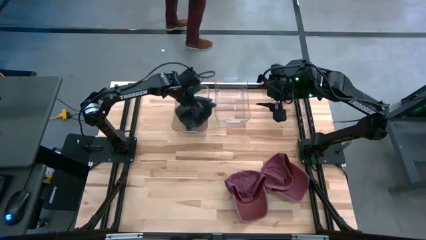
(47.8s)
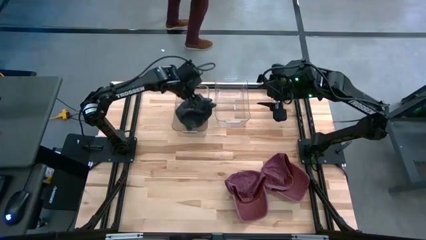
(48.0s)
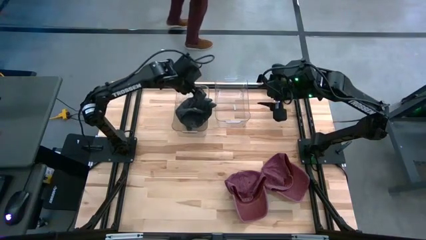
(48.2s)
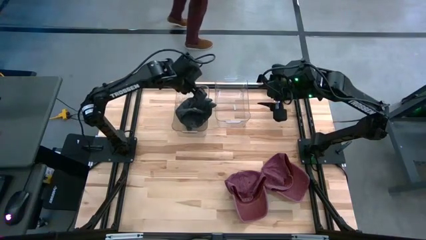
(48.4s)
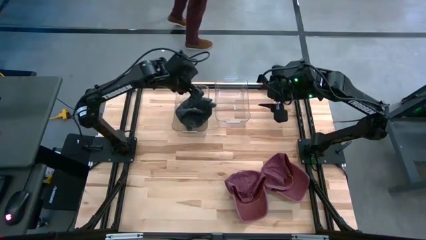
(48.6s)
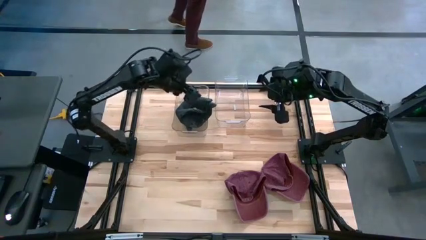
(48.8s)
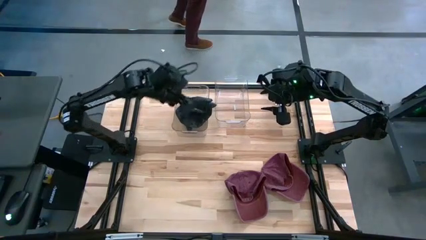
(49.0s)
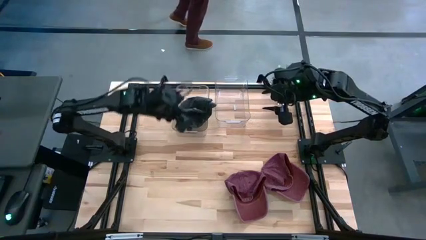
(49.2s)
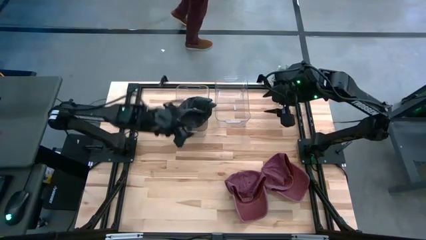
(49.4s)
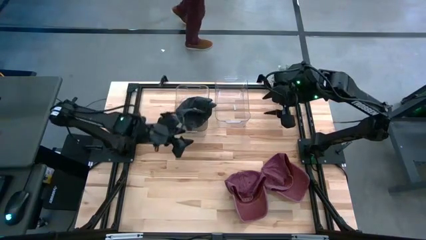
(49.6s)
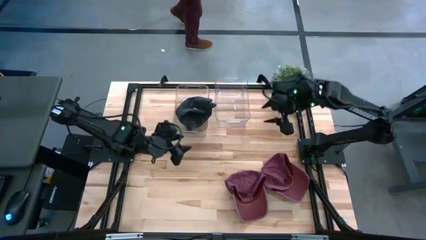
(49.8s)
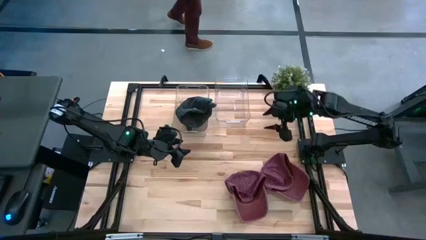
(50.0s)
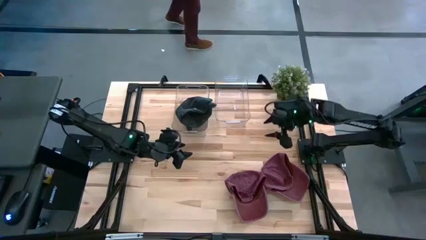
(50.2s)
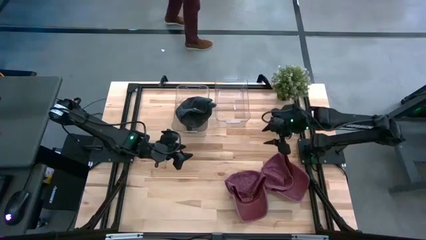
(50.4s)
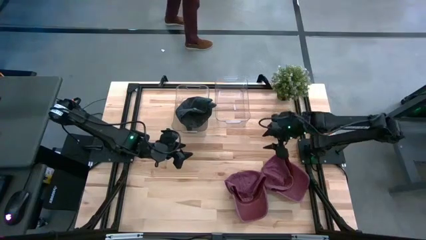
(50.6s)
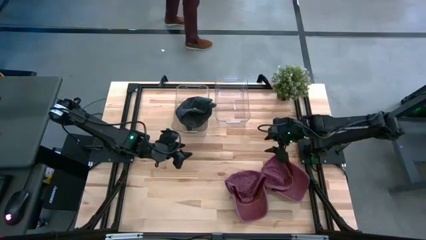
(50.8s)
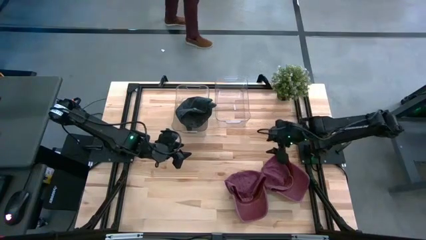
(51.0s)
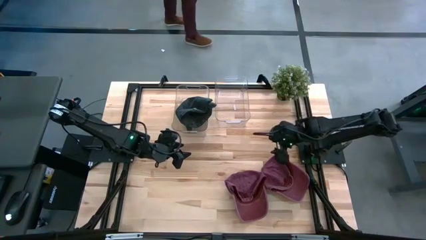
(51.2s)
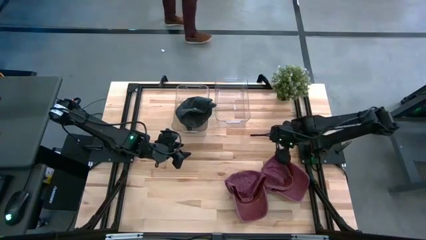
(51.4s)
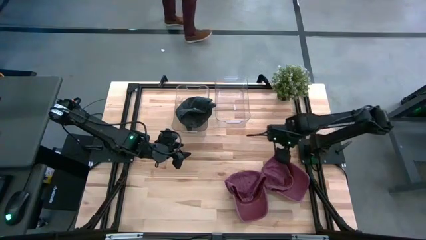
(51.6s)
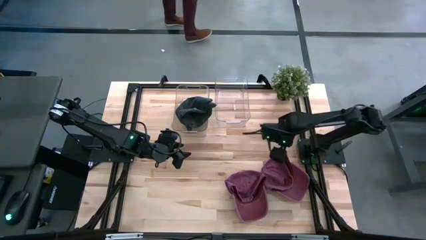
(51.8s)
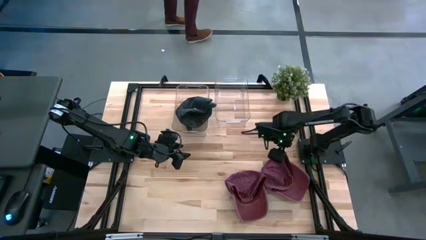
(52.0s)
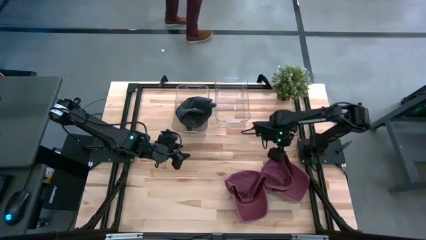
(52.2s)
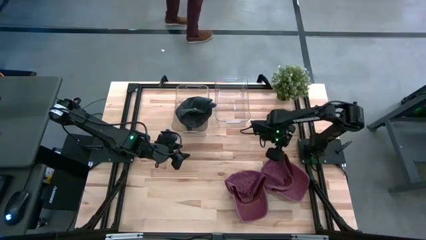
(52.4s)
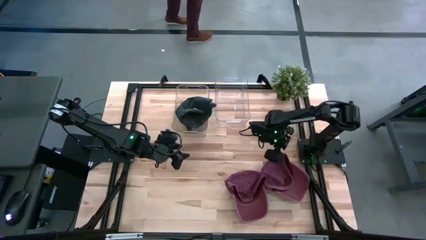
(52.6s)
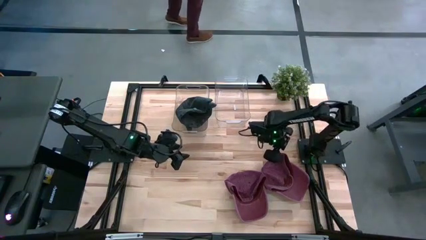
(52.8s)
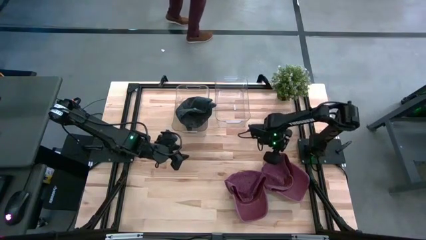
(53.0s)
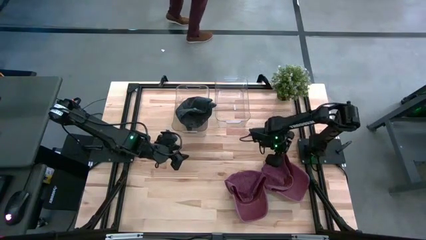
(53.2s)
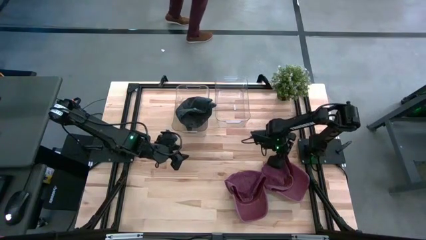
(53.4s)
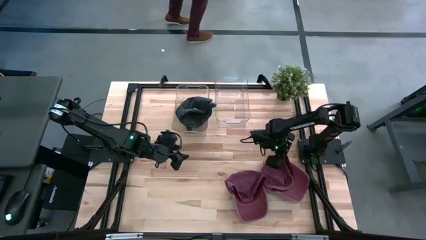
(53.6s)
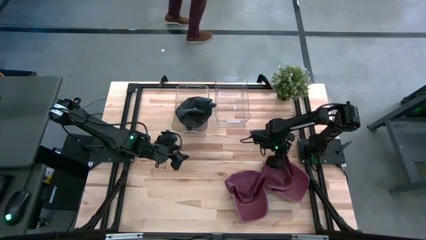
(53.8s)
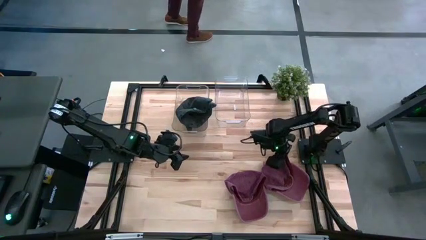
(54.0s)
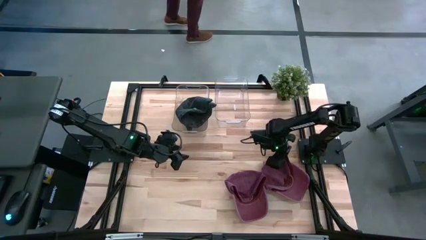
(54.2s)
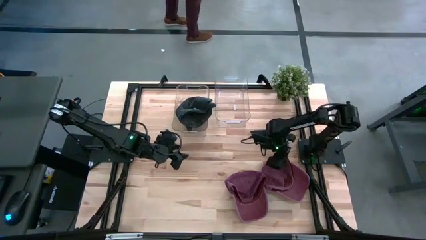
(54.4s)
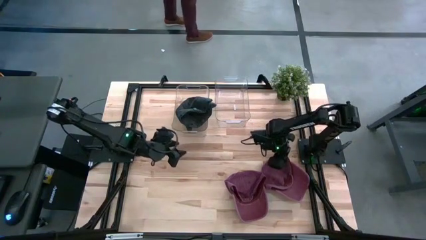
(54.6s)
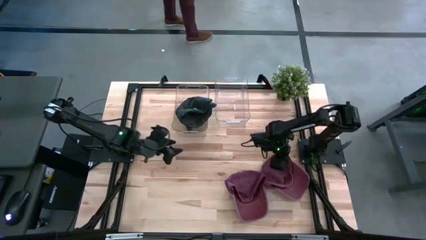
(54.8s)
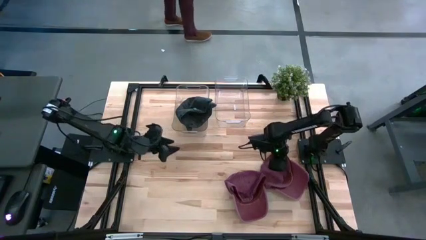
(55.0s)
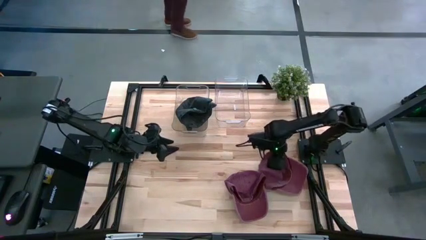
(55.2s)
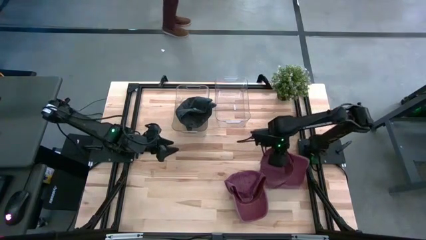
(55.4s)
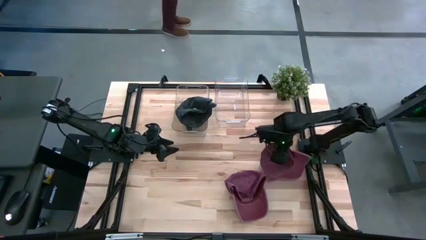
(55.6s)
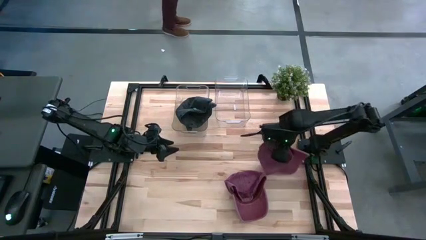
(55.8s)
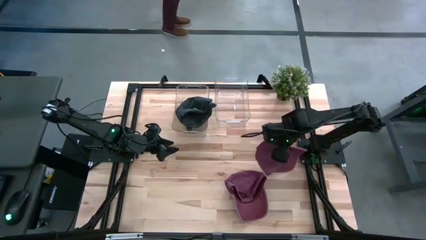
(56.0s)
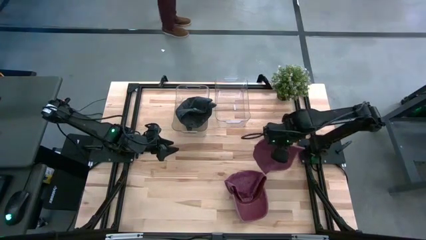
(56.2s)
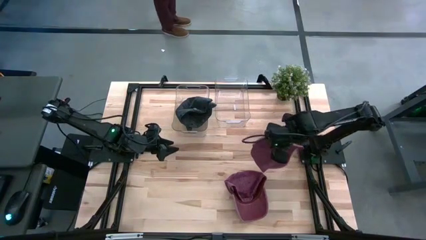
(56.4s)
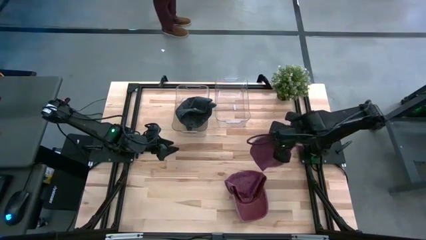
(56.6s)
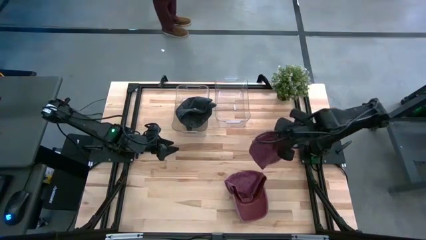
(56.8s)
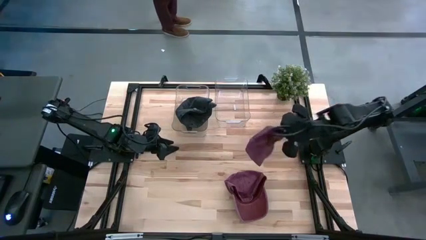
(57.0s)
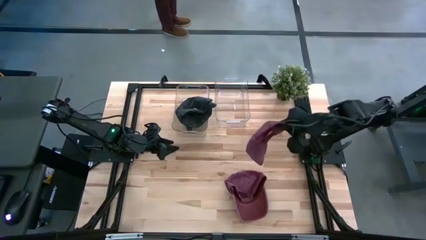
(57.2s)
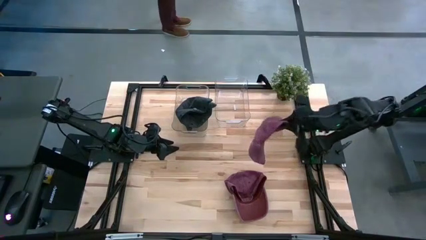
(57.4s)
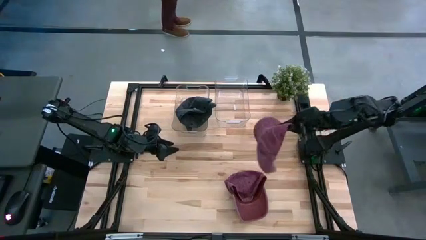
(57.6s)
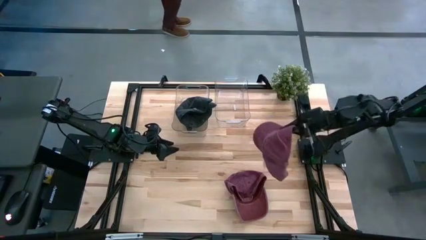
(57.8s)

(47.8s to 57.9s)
Task: Pick & Place hat
Put the right red cap into the right transparent bin

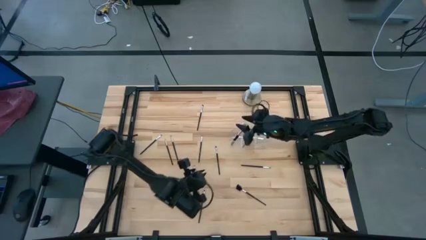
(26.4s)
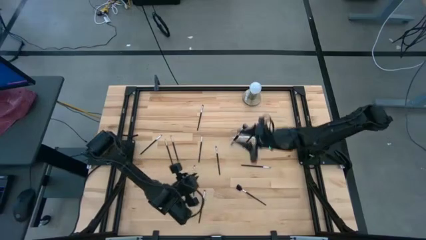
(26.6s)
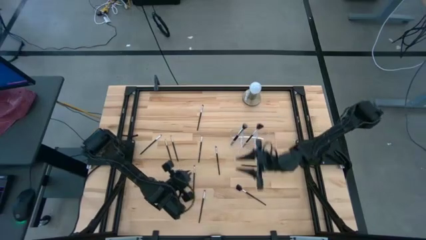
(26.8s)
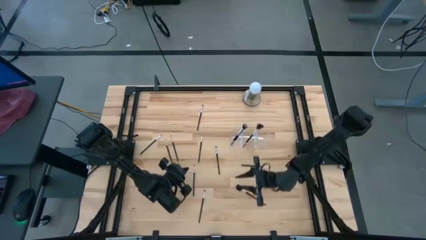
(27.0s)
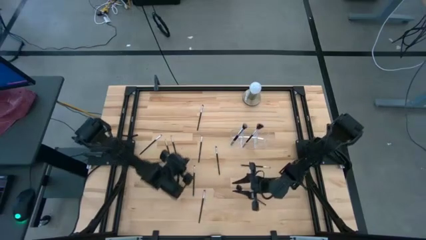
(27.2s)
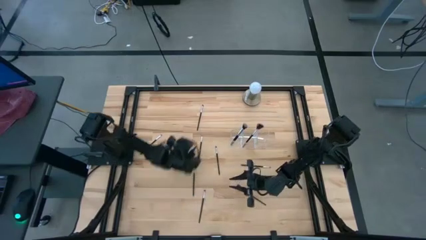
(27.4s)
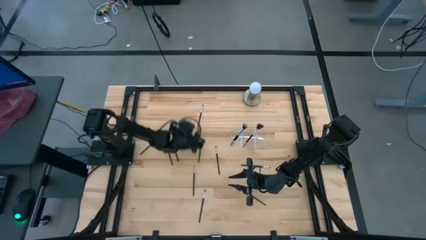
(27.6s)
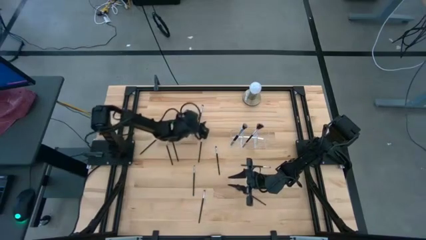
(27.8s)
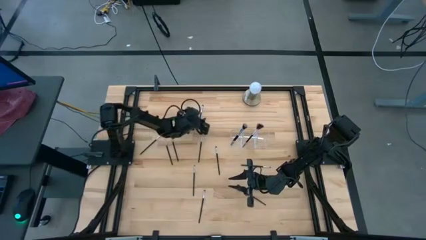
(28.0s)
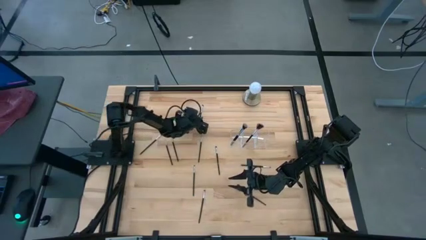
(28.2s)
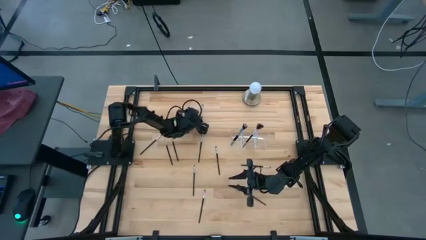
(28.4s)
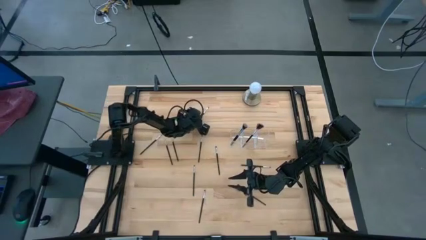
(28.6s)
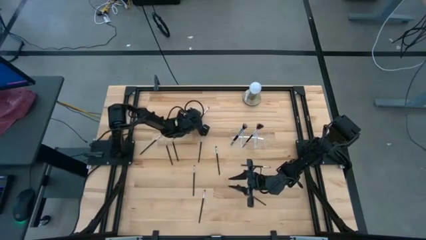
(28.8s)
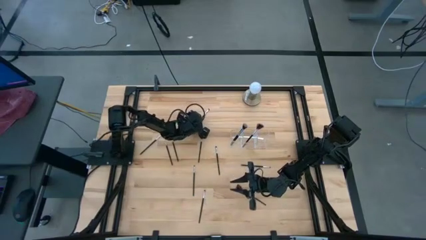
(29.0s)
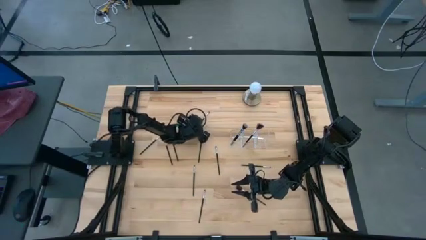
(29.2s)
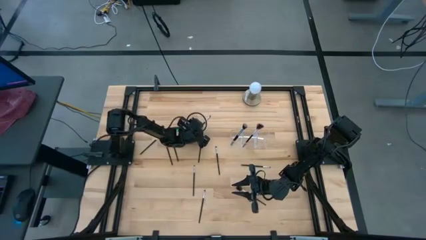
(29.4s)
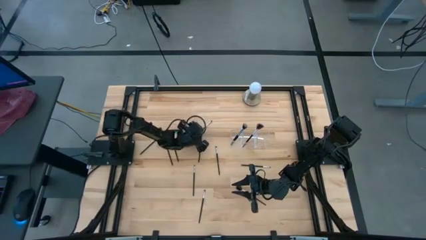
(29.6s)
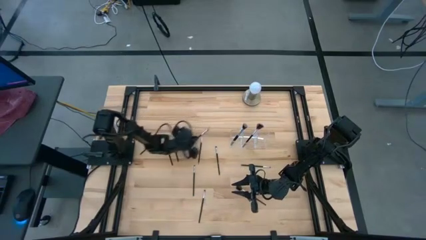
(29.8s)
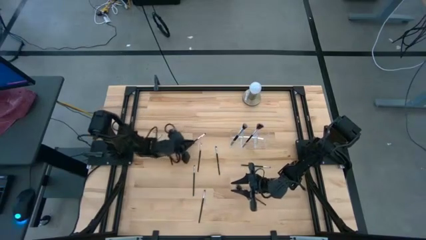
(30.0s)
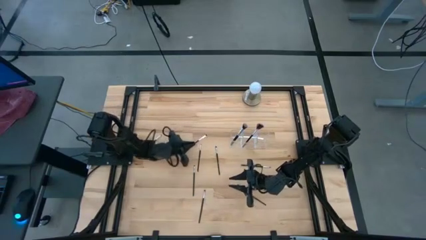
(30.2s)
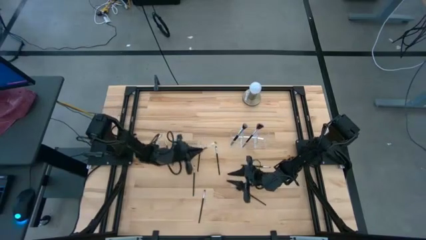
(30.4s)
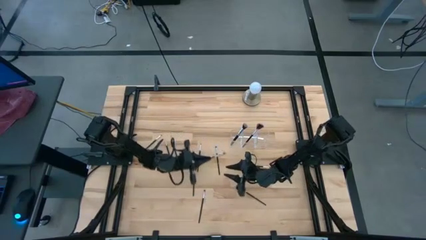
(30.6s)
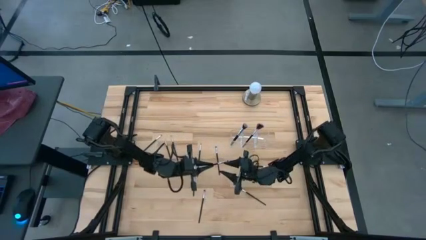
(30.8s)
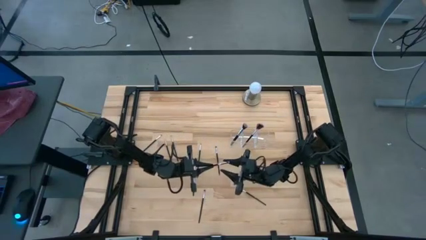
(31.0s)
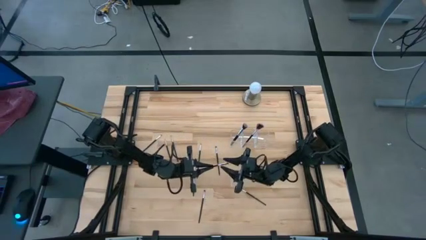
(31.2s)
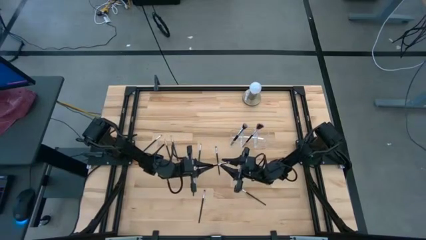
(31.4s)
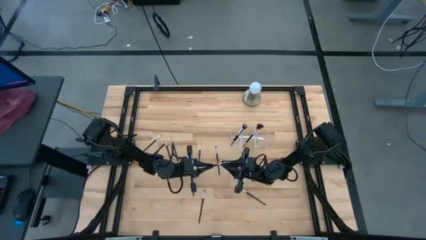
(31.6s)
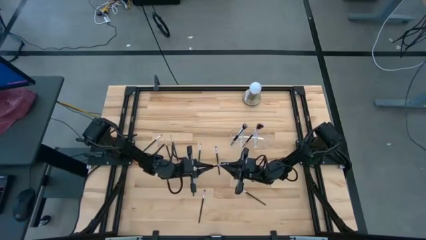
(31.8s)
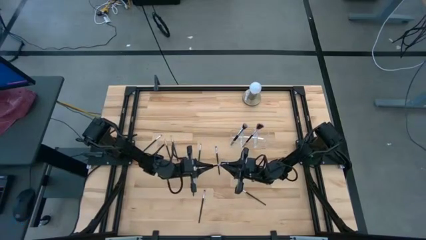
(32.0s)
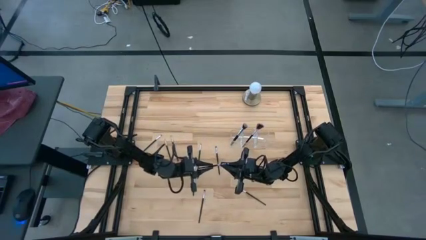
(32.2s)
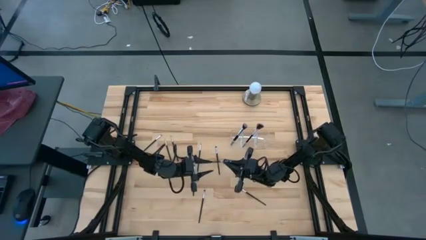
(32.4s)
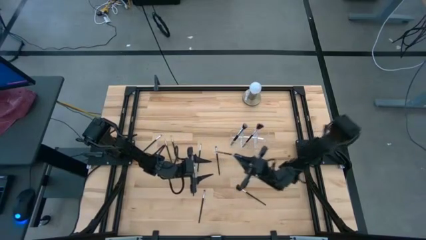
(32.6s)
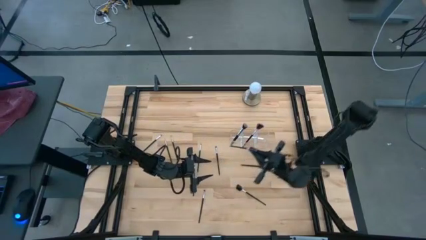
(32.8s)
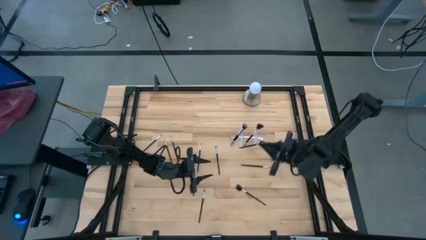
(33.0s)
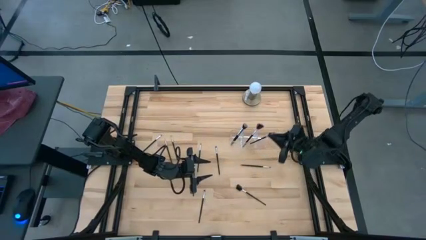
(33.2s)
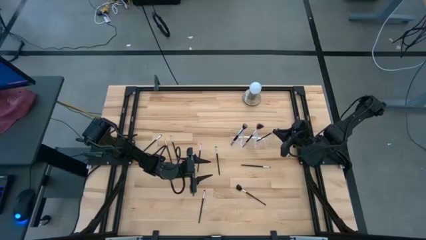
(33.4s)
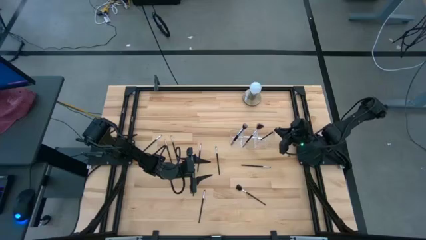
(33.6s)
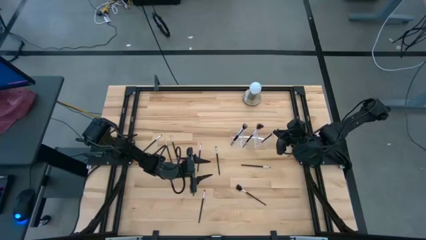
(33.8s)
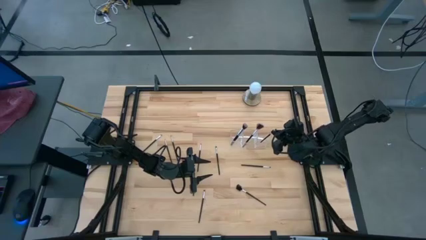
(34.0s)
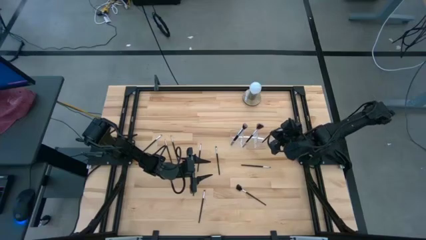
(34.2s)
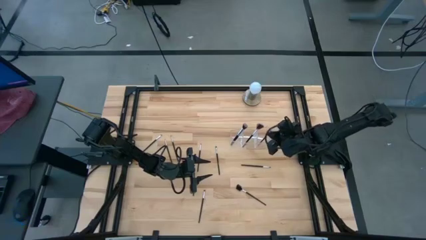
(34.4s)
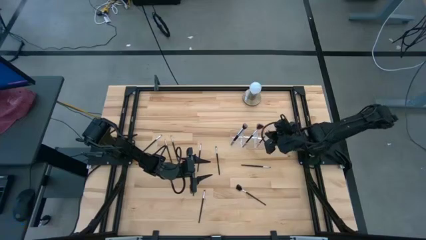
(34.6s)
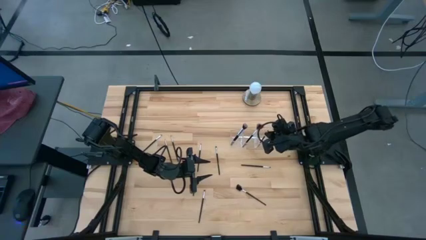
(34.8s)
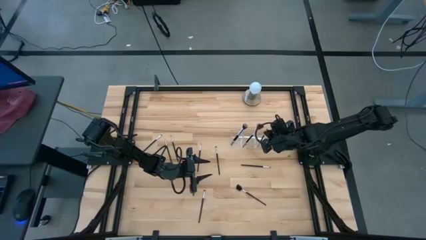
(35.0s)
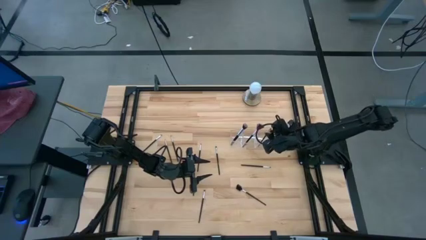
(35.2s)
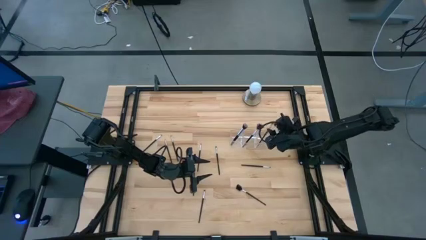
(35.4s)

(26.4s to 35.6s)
Task: Put items in baskets/containers
Put the black eyeshadow brush into the transparent organizer
